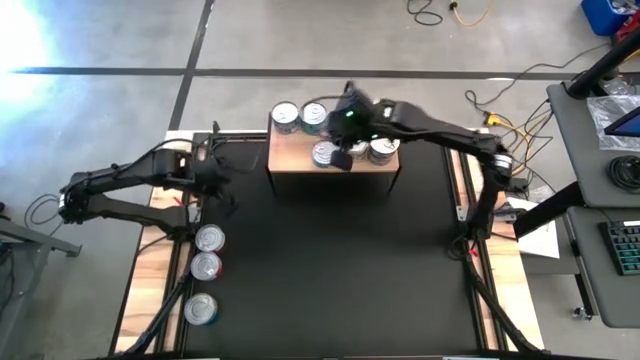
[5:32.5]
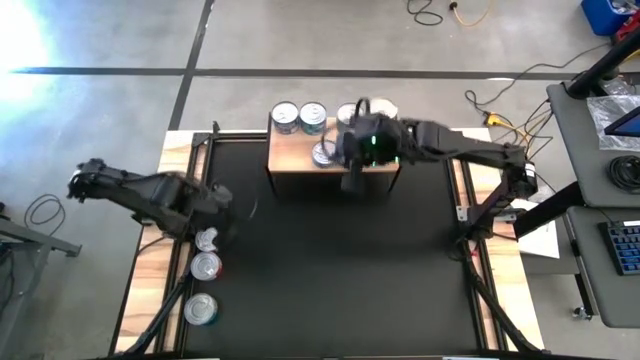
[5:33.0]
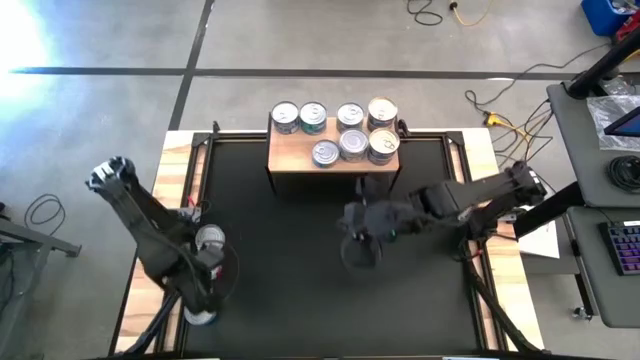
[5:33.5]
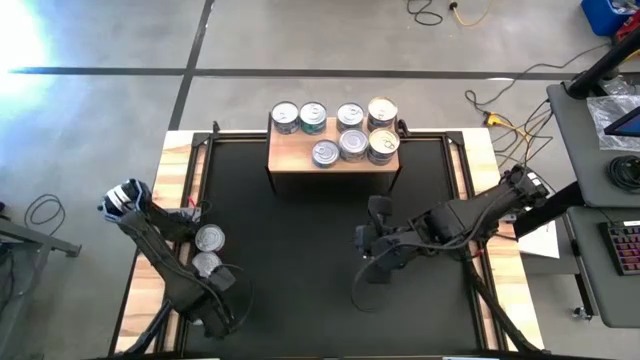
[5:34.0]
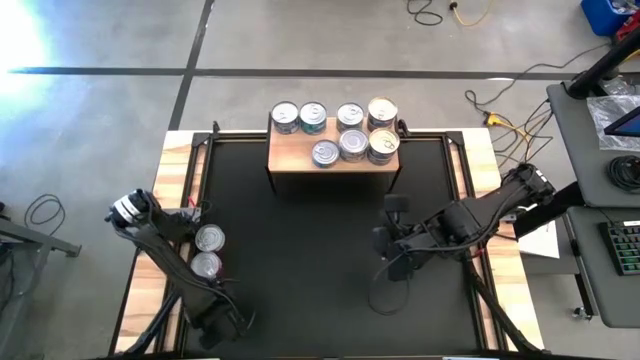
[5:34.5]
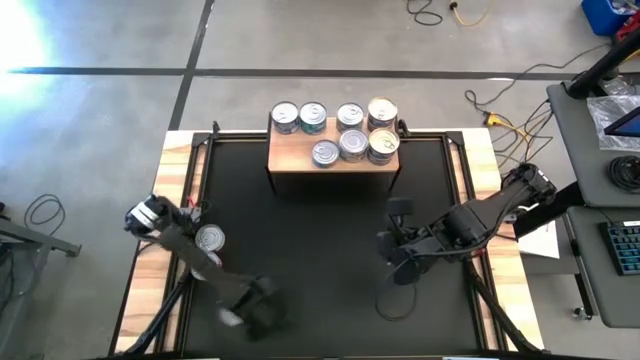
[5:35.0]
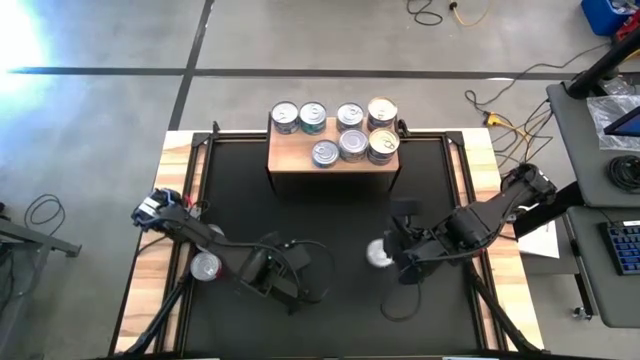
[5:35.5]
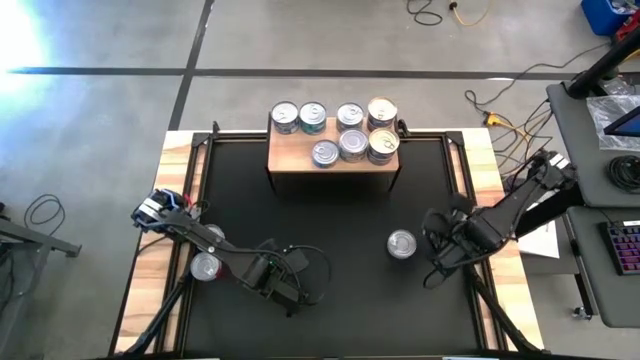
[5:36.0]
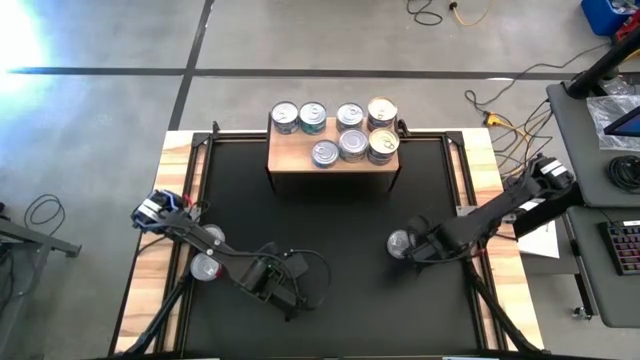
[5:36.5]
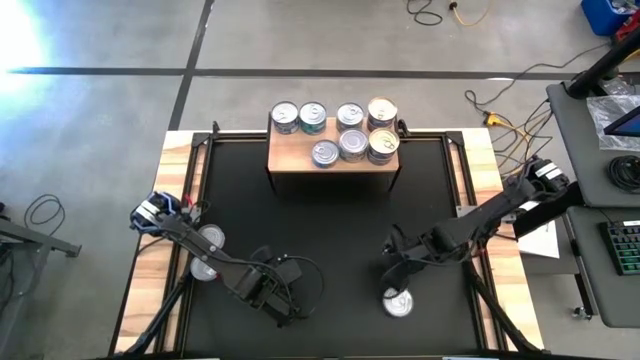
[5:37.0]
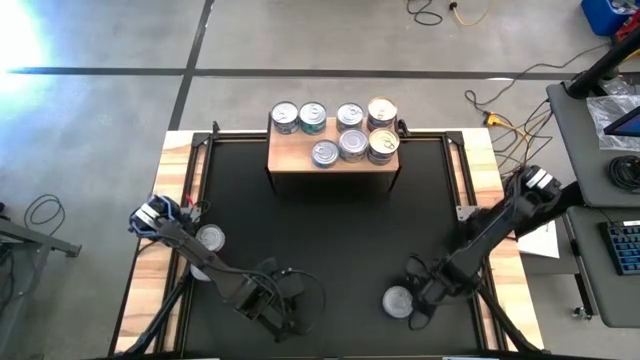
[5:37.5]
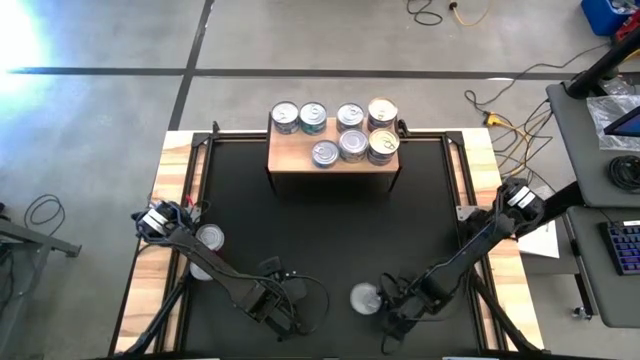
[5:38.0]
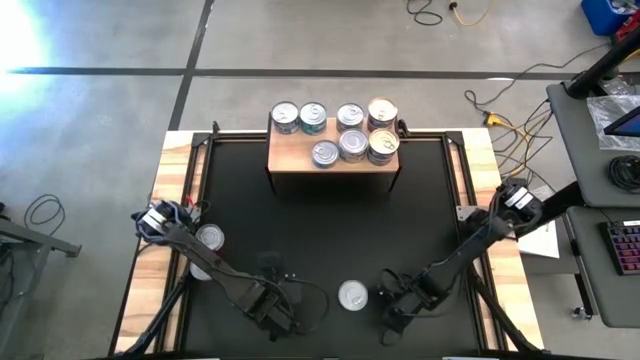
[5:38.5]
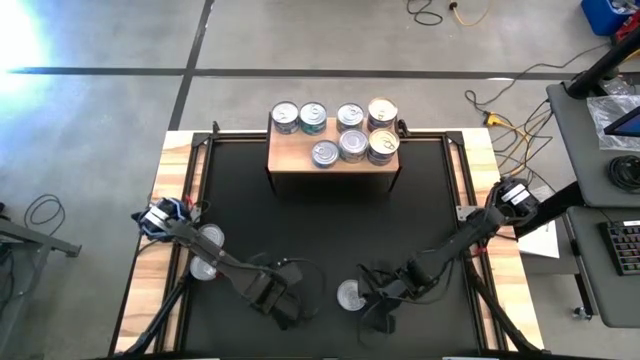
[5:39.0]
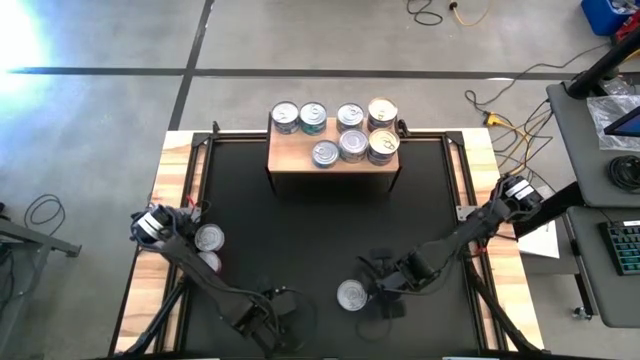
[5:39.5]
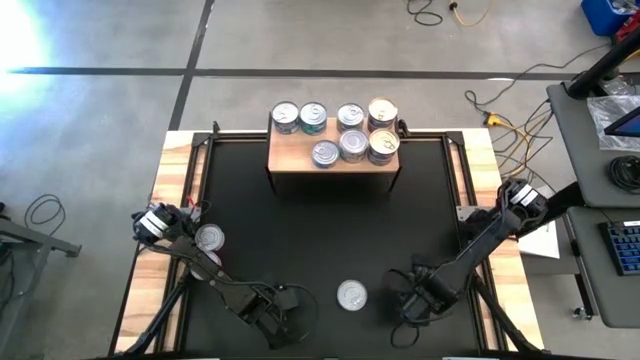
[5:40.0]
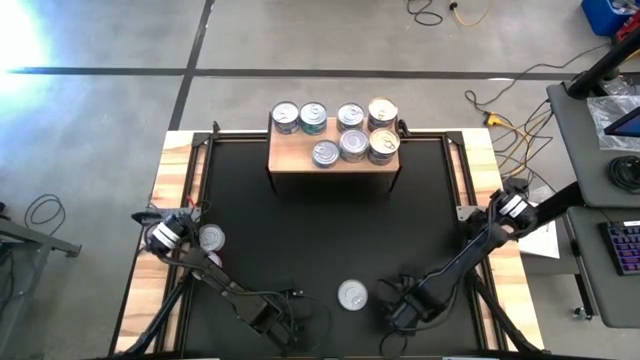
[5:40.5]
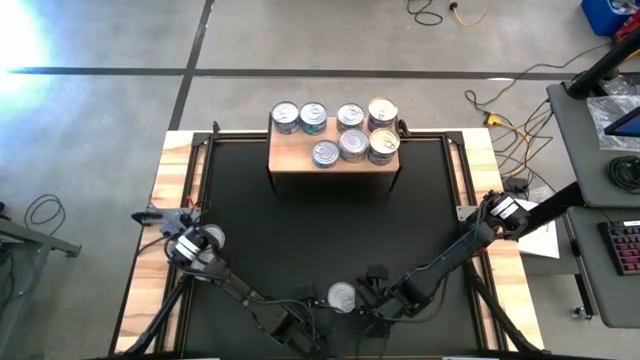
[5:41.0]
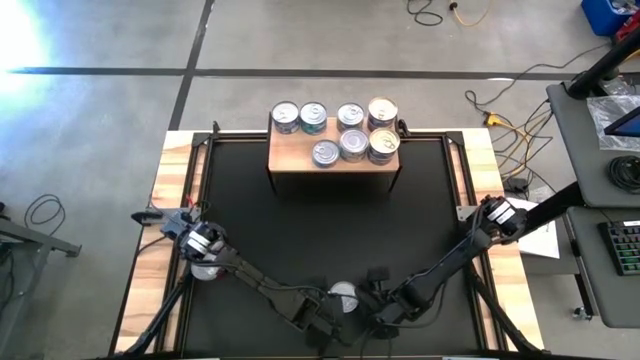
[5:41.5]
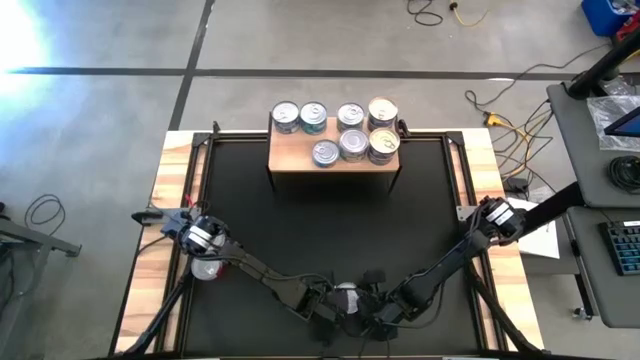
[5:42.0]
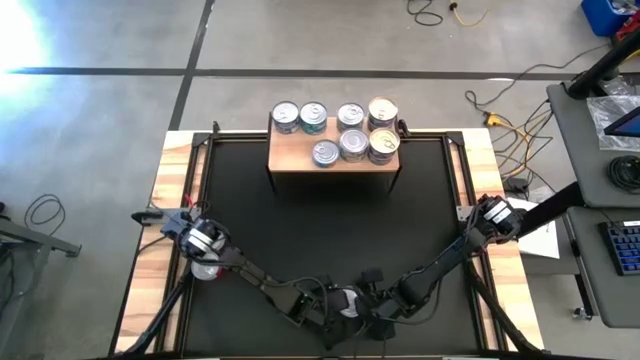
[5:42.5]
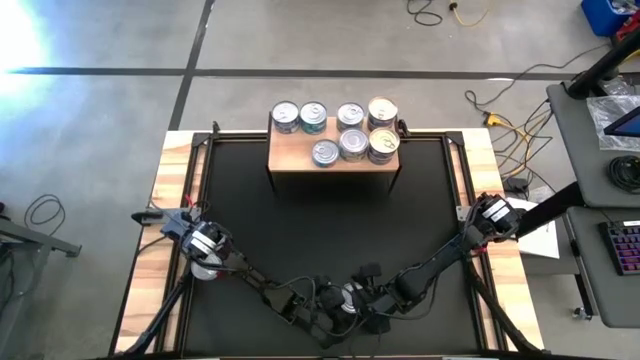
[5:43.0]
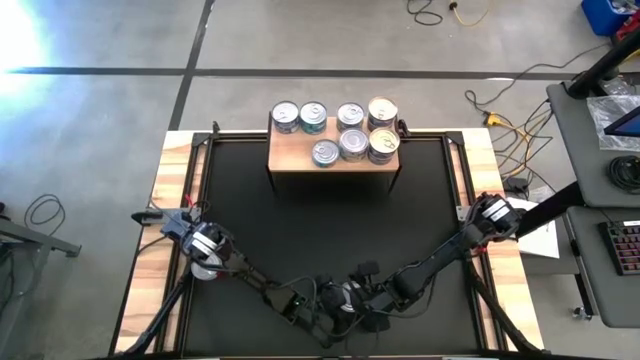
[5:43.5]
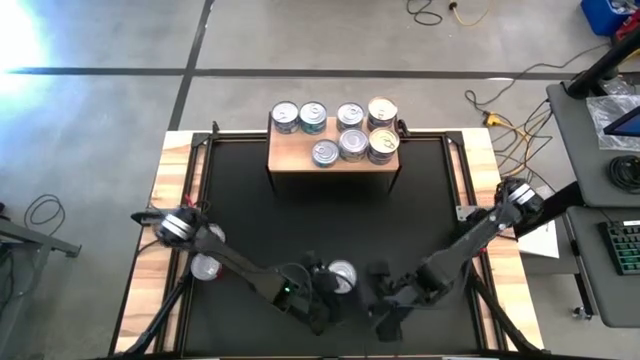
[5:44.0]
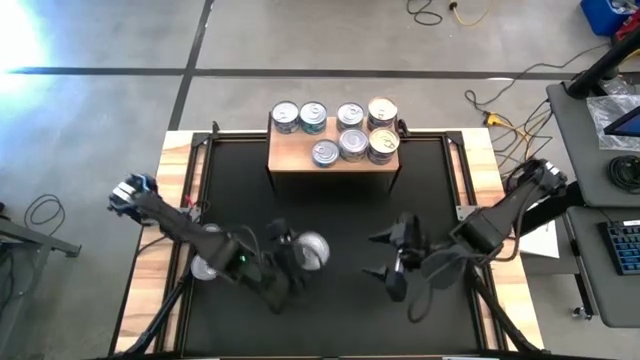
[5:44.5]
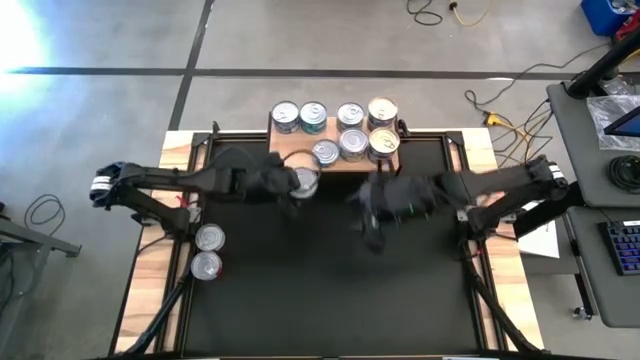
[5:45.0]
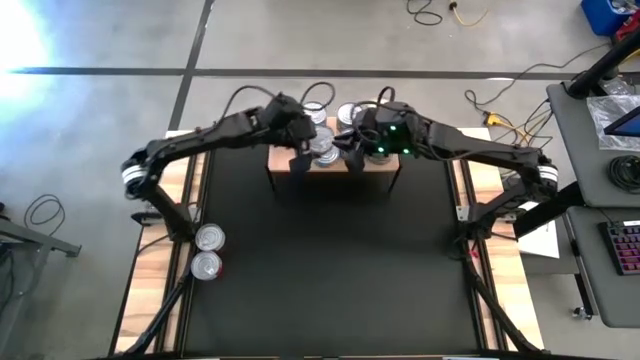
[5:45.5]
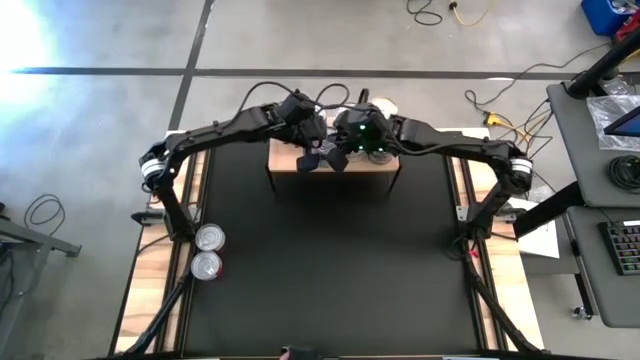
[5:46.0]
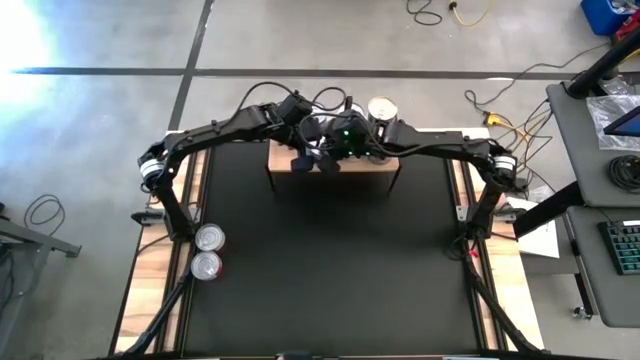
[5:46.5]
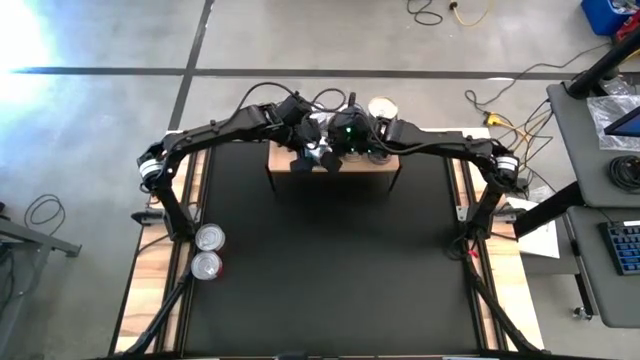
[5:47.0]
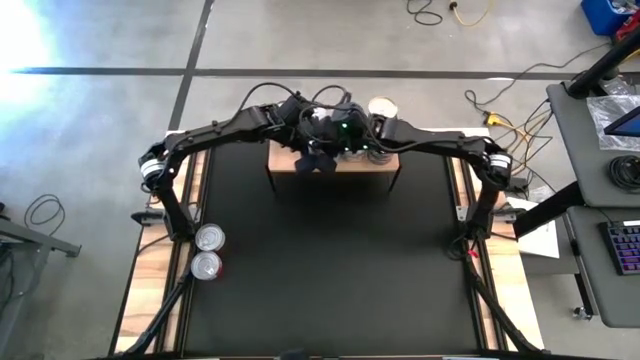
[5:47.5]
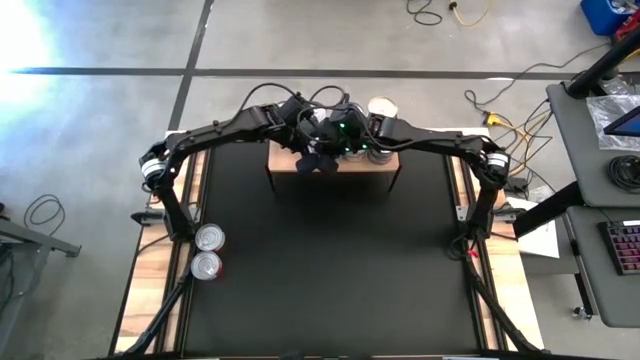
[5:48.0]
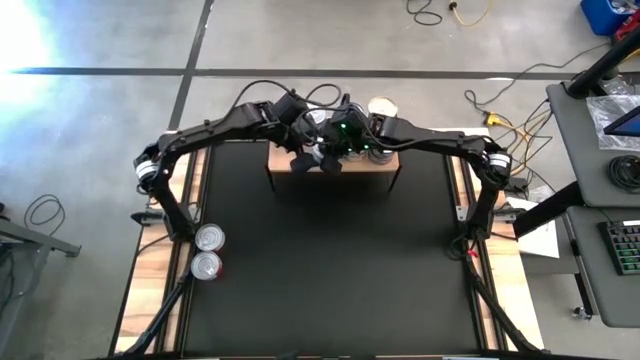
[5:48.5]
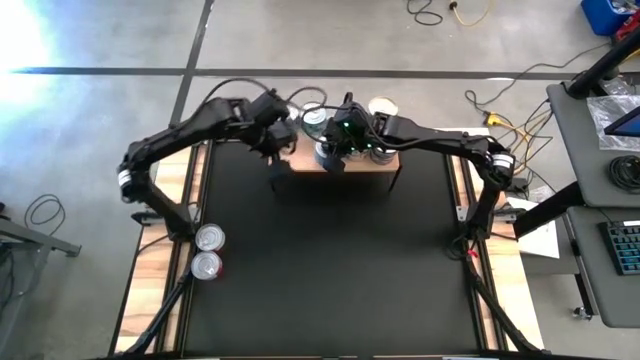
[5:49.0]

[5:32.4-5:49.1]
Task: Stack canned seafood by type on shelf
Stack the yellow-blue tuna on top of the yellow-blue tuna can on the shelf

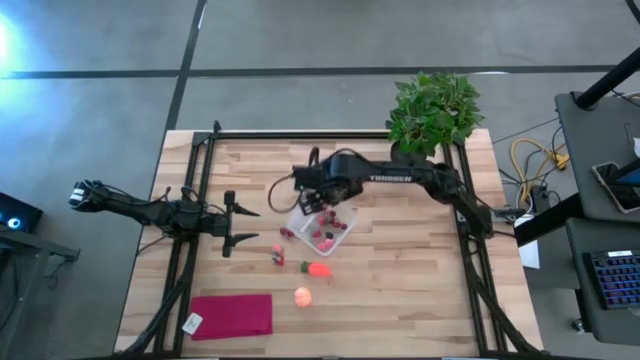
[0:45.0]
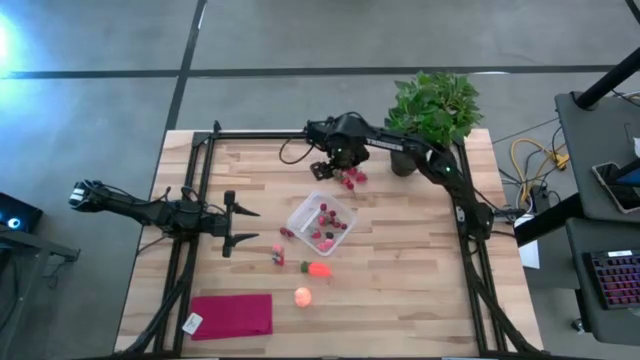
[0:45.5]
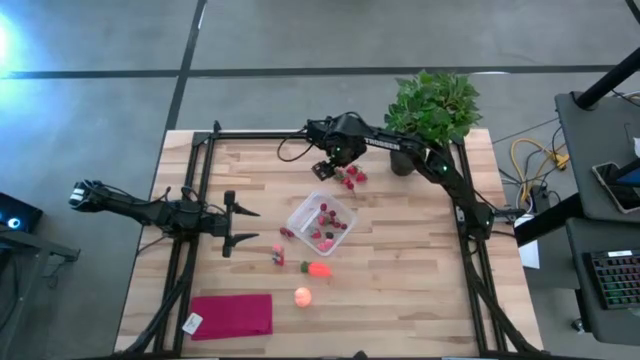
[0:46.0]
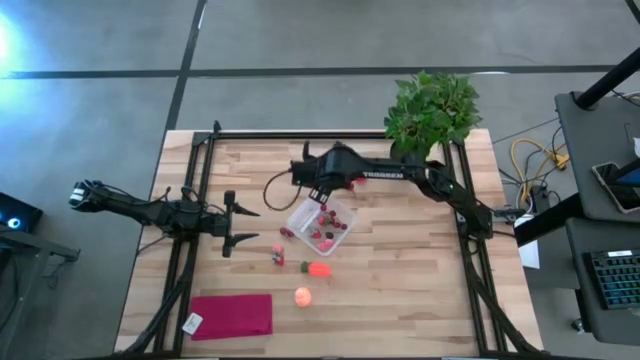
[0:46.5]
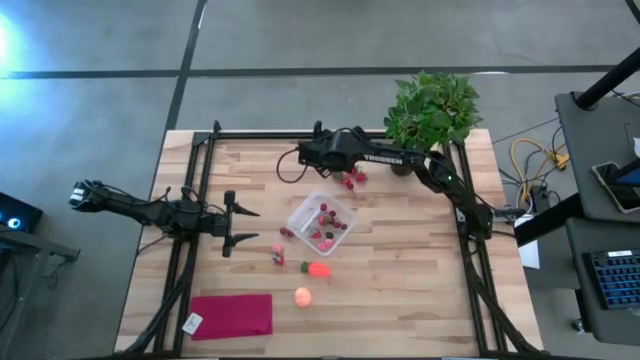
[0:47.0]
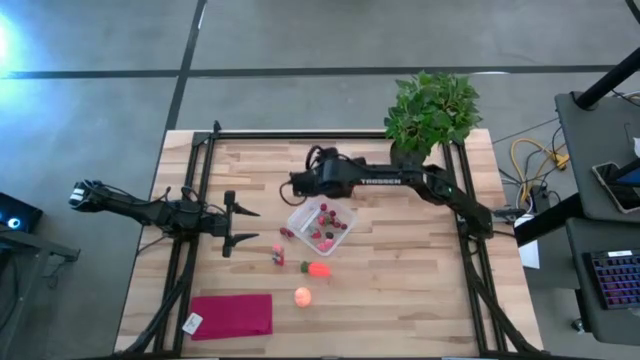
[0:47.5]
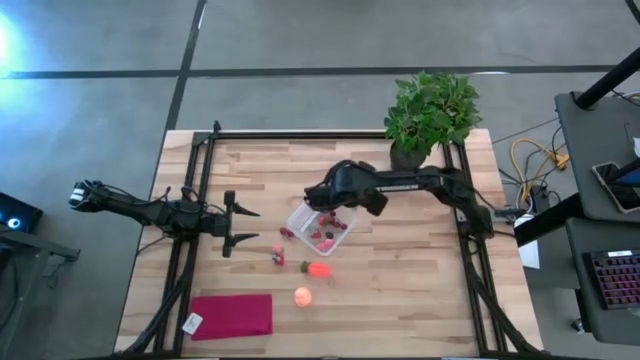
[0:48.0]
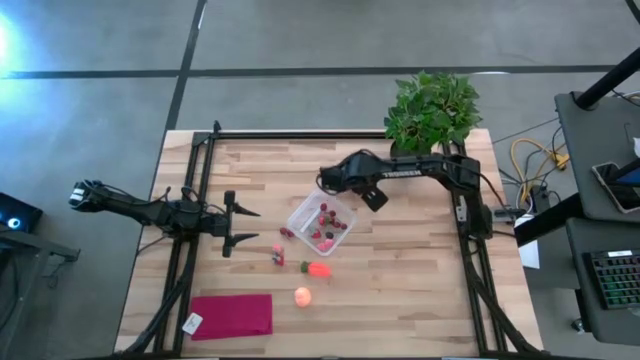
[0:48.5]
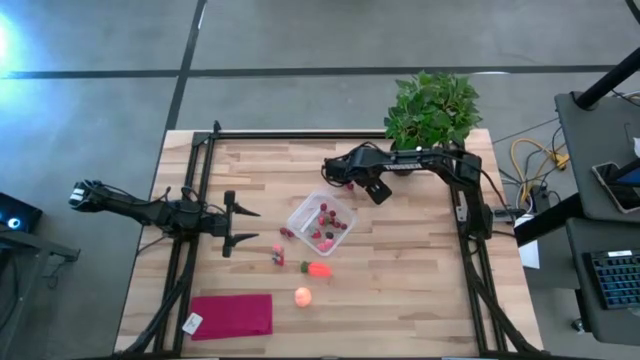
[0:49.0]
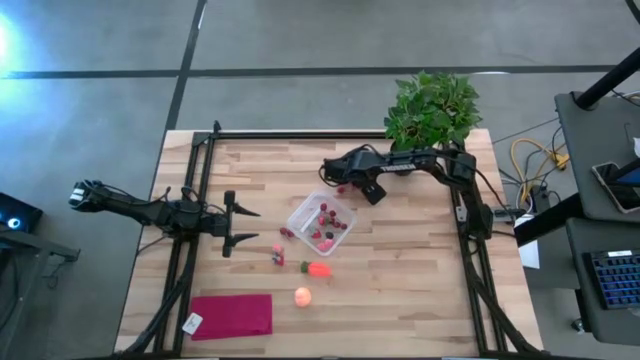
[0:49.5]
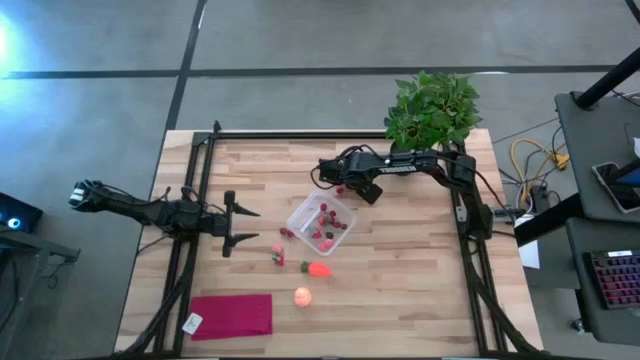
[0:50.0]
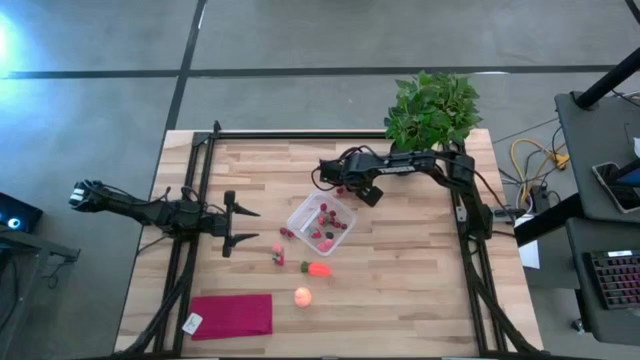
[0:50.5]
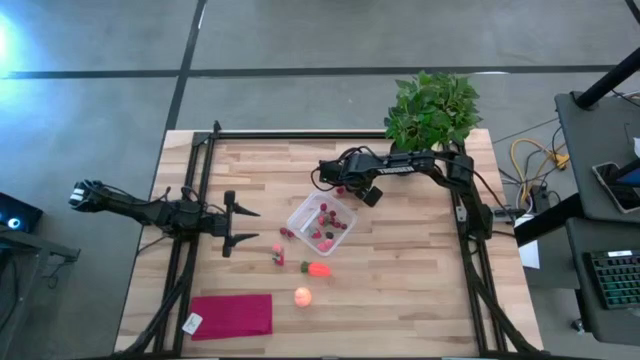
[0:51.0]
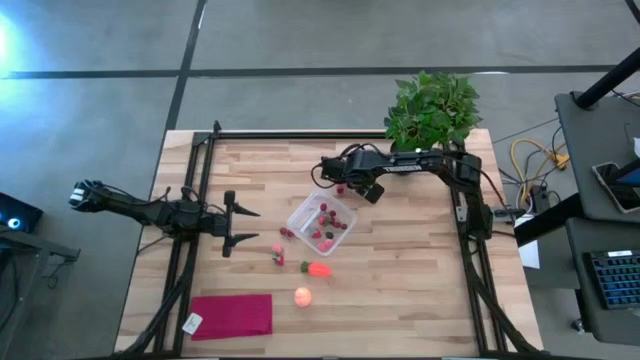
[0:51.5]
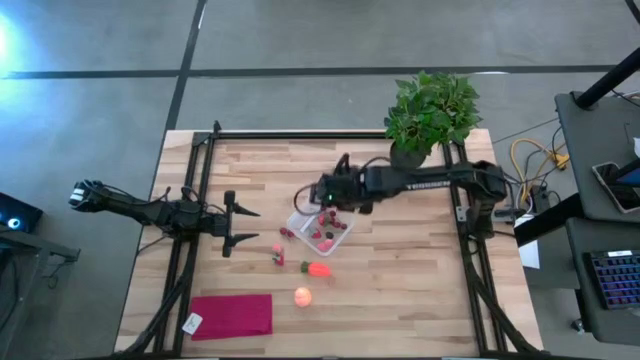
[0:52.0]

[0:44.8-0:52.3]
Task: Pick and placing Produce into tupperware
Put the red strawberry into the transparent container
